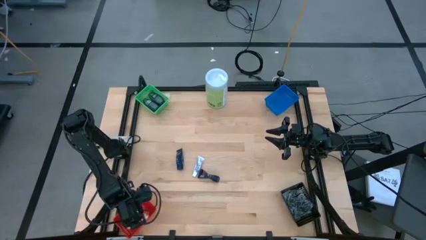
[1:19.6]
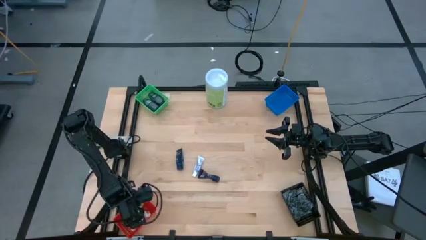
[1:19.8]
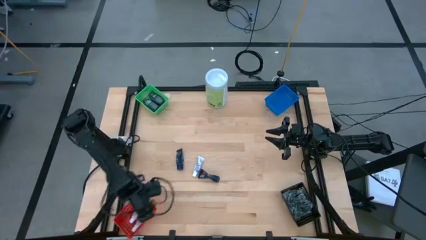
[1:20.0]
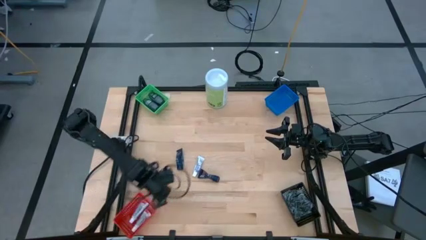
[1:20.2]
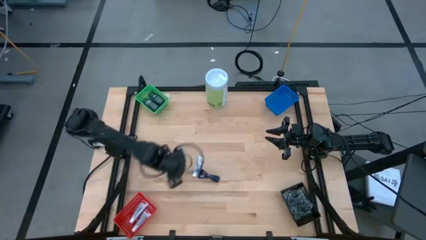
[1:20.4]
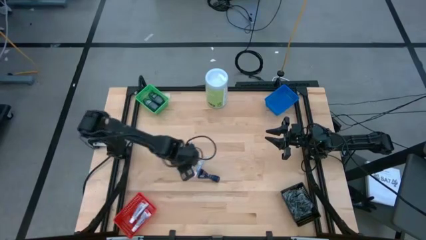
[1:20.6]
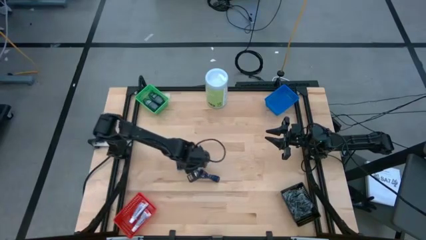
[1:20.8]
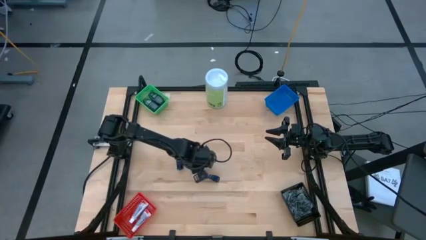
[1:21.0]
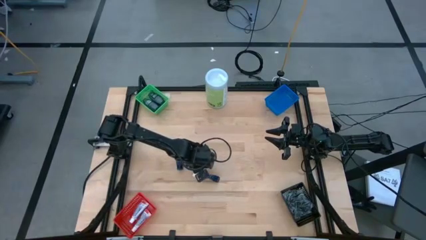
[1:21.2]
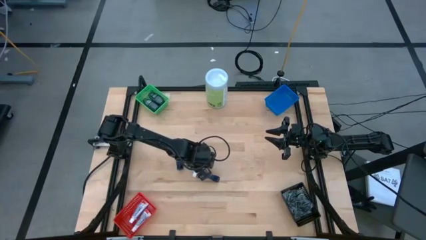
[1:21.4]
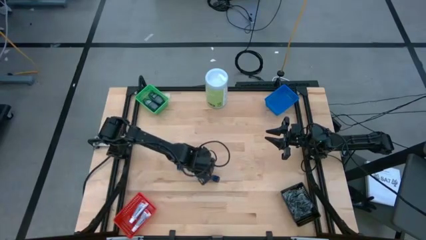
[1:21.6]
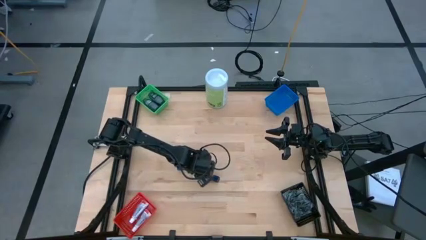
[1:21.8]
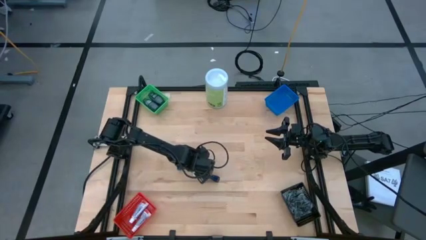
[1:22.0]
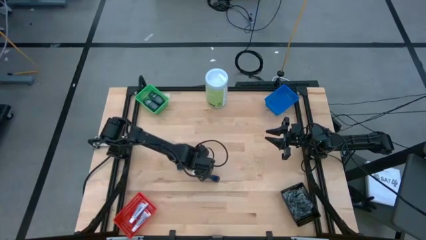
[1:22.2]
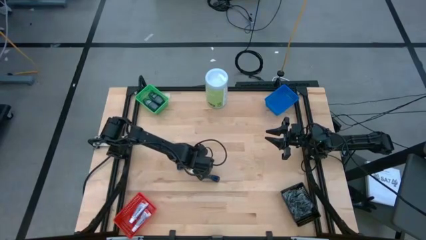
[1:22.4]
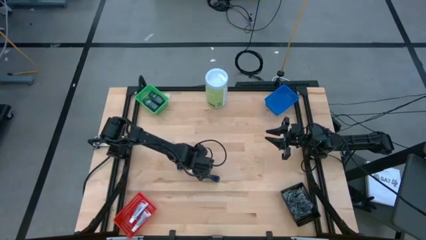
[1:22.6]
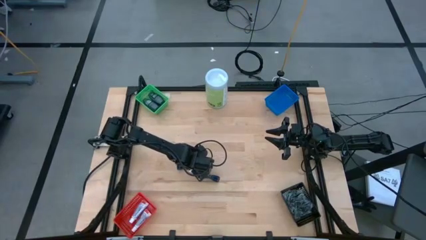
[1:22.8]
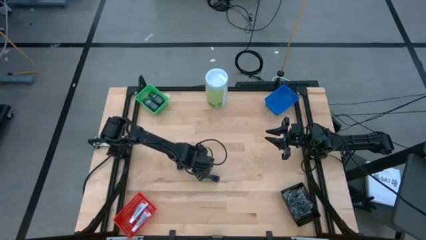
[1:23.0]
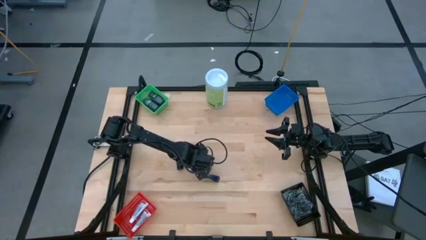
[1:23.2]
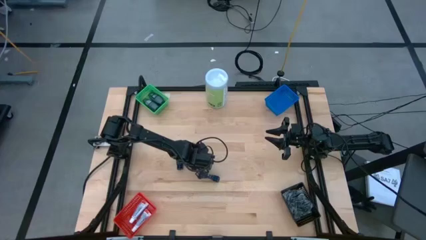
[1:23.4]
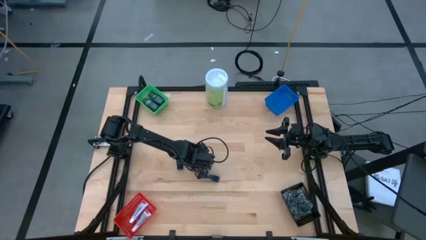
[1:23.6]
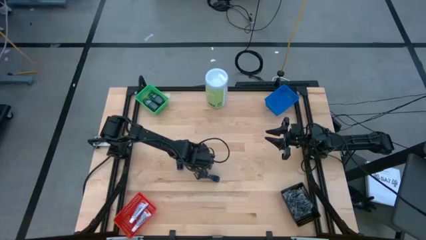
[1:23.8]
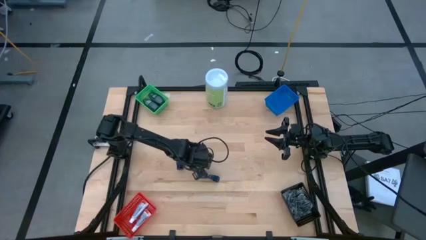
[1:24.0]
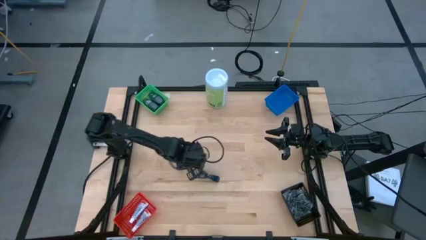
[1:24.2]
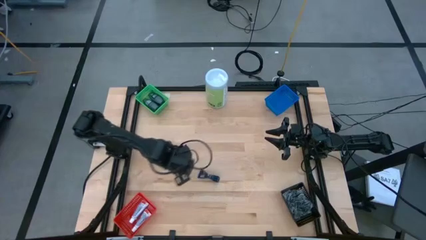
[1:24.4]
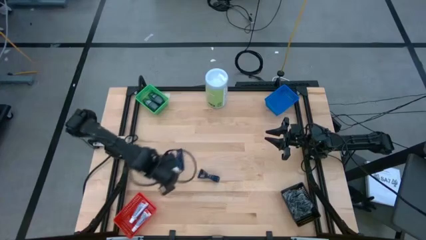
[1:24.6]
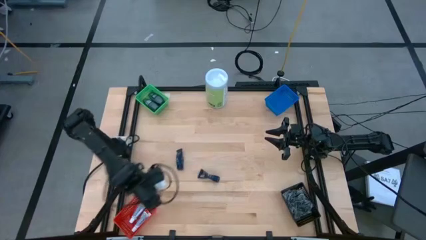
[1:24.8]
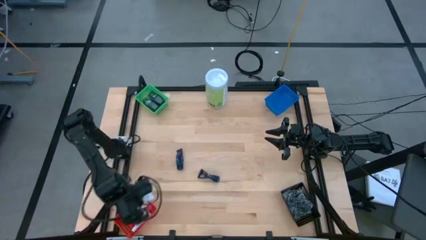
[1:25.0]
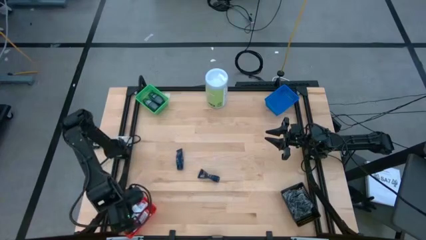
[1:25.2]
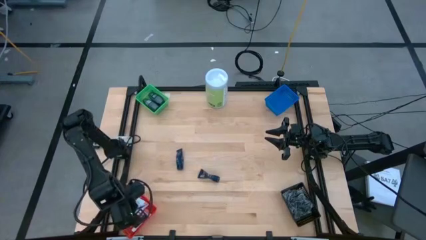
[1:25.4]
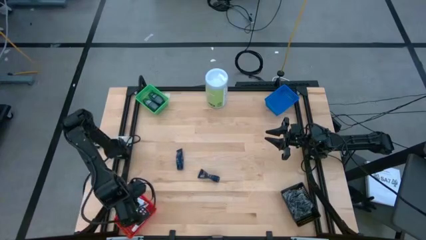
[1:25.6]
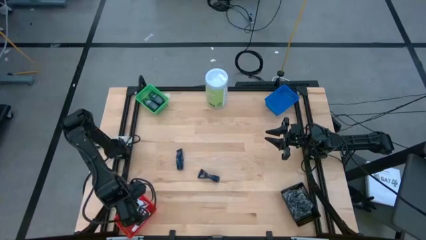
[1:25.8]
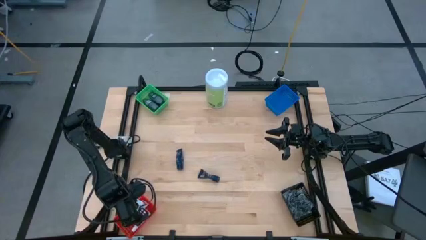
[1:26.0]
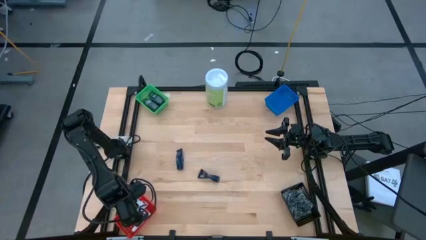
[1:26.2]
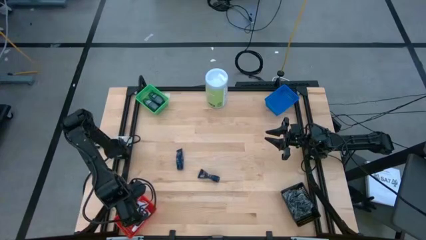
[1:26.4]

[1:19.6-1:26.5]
Task: Pick & Place Travel size toiletries
Put the white toothpaste into the red bin
